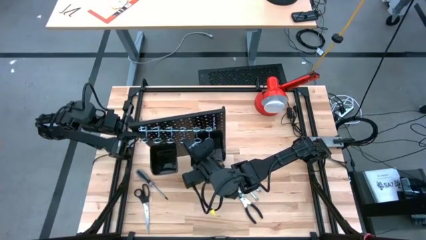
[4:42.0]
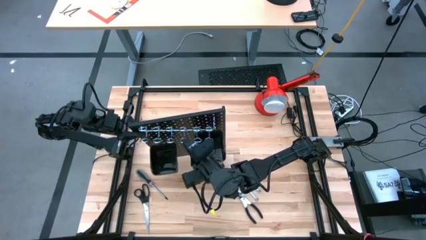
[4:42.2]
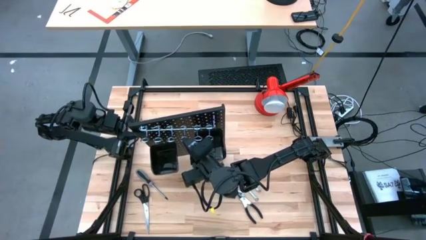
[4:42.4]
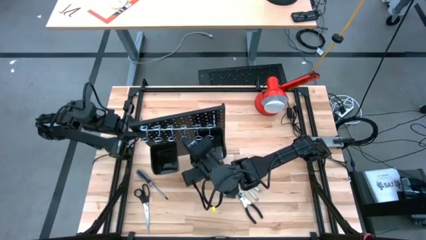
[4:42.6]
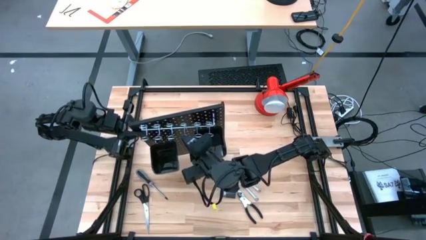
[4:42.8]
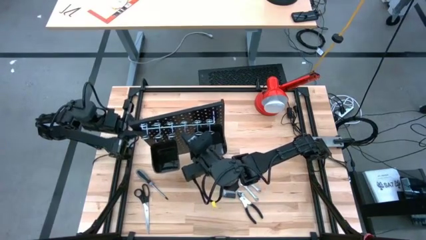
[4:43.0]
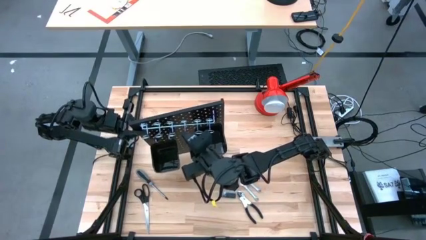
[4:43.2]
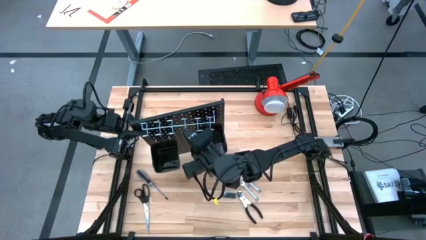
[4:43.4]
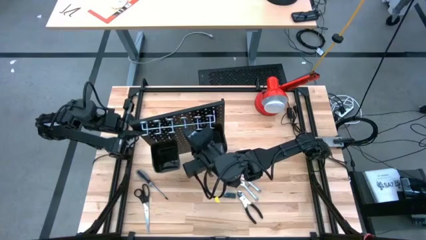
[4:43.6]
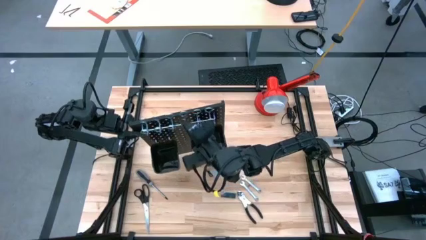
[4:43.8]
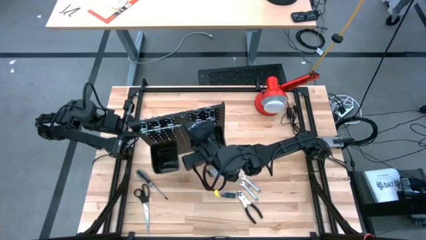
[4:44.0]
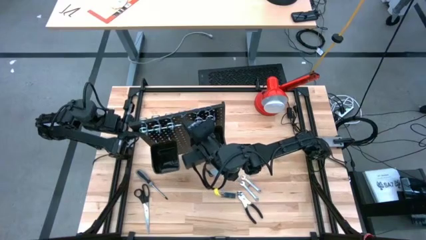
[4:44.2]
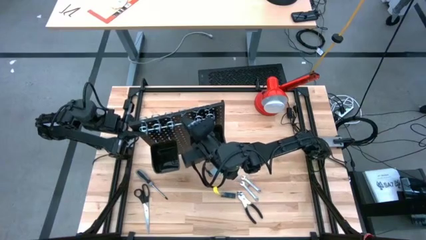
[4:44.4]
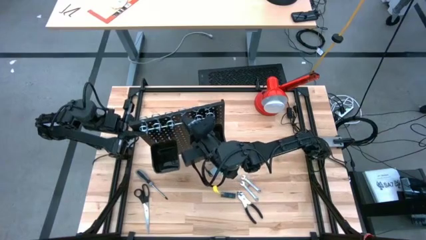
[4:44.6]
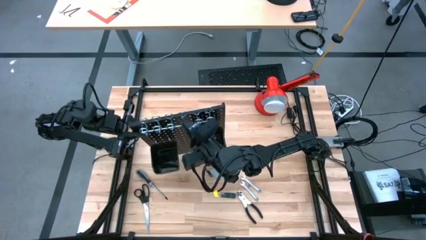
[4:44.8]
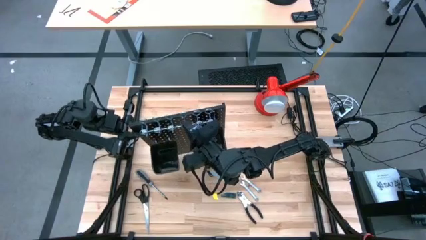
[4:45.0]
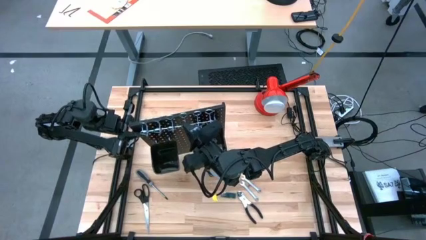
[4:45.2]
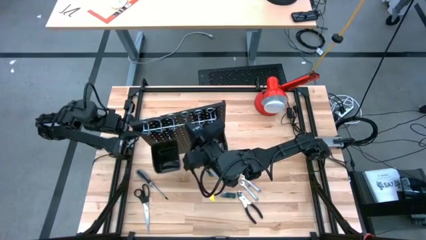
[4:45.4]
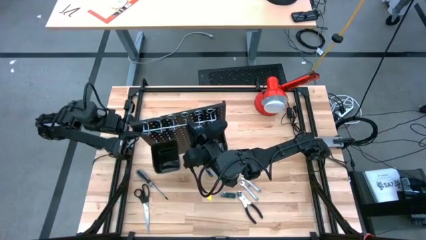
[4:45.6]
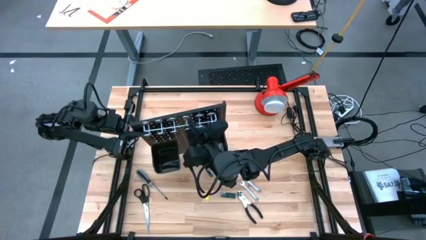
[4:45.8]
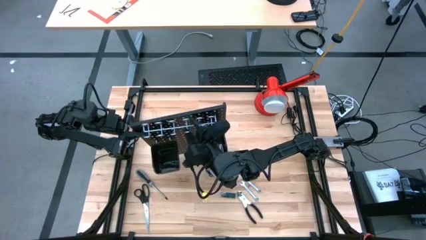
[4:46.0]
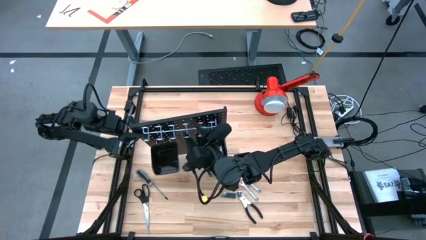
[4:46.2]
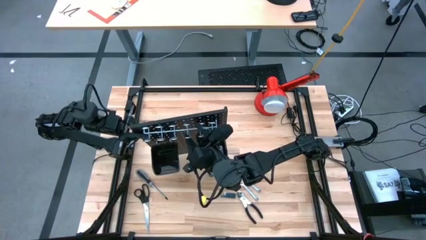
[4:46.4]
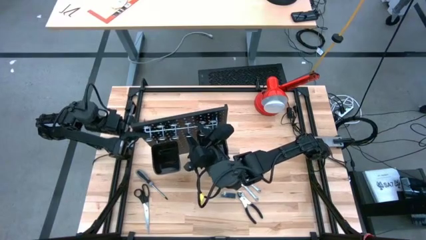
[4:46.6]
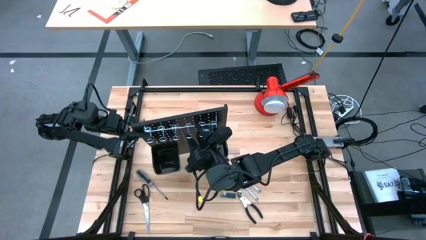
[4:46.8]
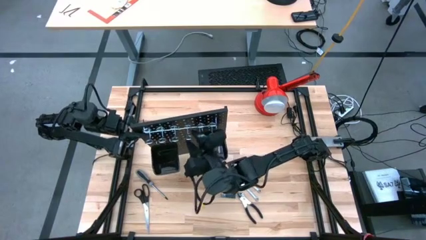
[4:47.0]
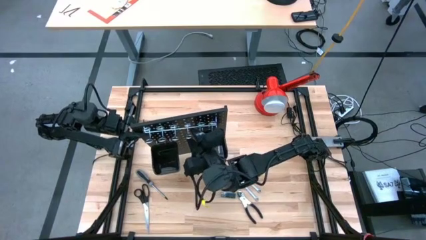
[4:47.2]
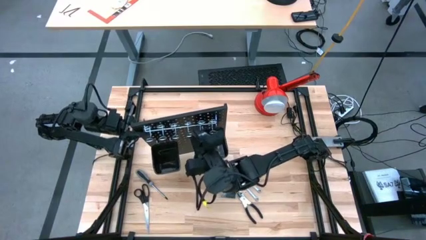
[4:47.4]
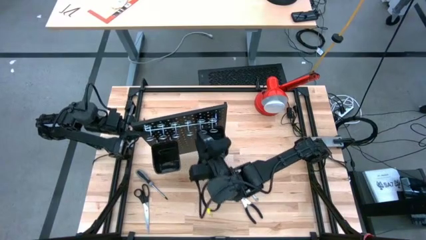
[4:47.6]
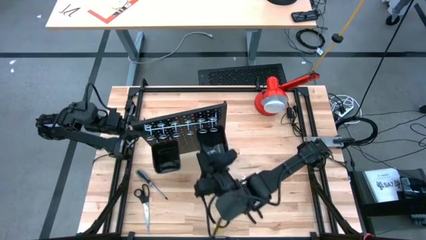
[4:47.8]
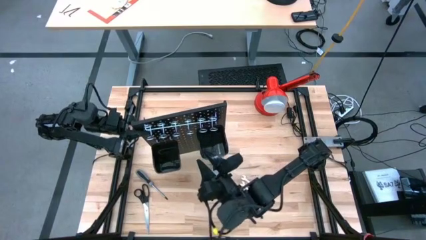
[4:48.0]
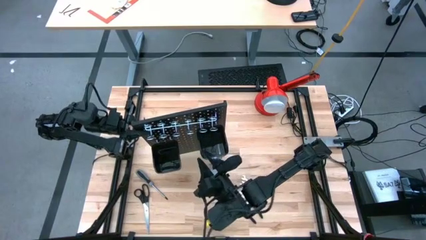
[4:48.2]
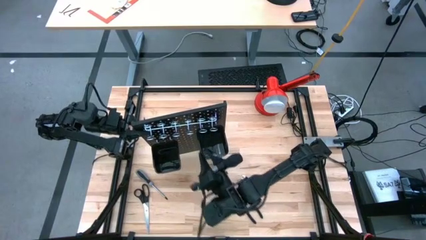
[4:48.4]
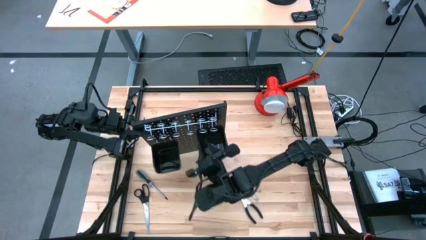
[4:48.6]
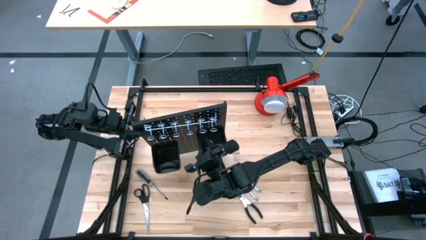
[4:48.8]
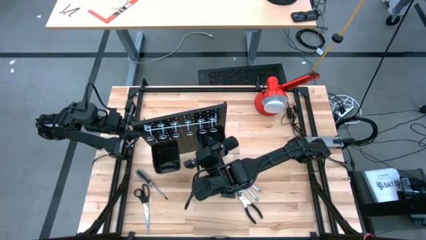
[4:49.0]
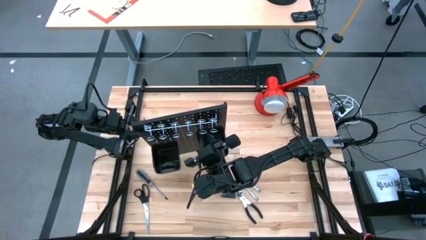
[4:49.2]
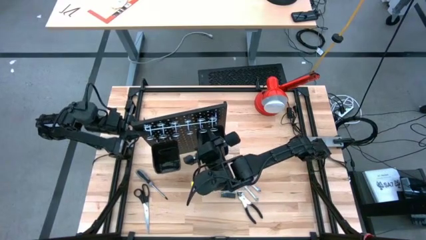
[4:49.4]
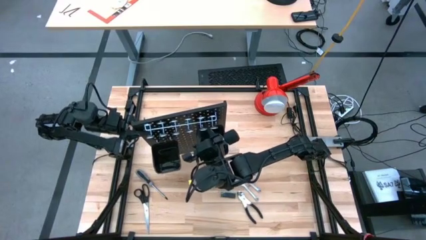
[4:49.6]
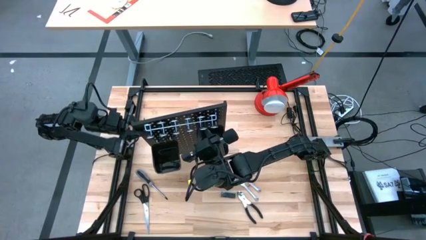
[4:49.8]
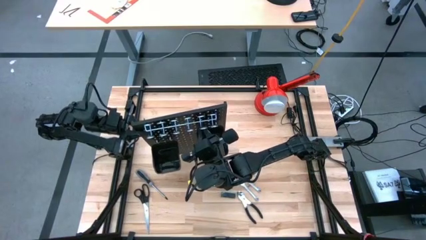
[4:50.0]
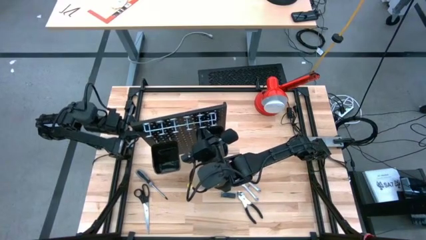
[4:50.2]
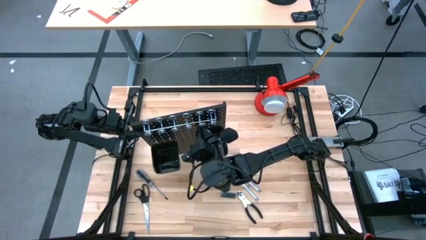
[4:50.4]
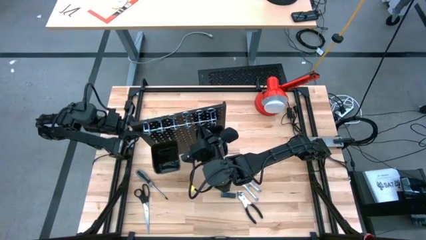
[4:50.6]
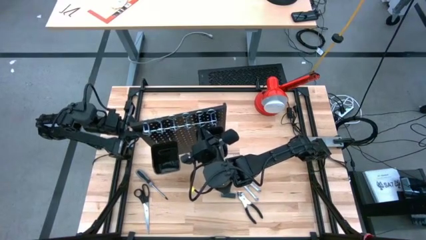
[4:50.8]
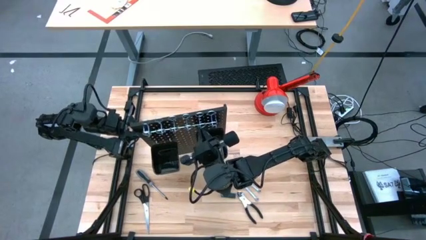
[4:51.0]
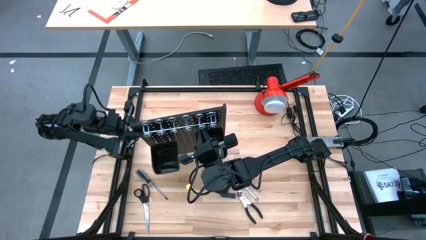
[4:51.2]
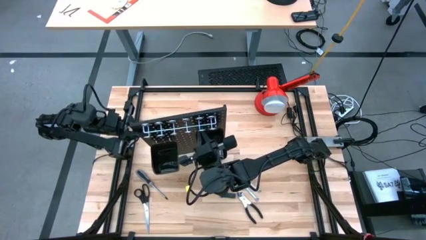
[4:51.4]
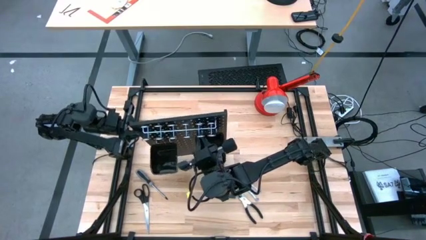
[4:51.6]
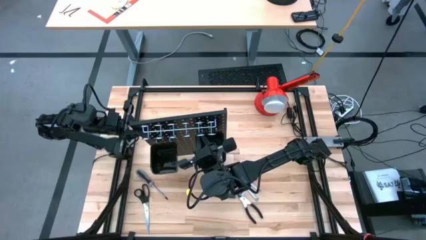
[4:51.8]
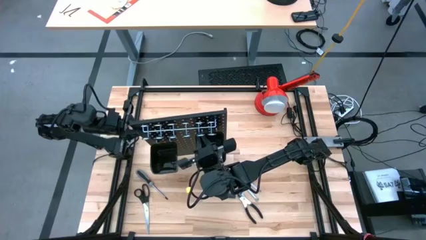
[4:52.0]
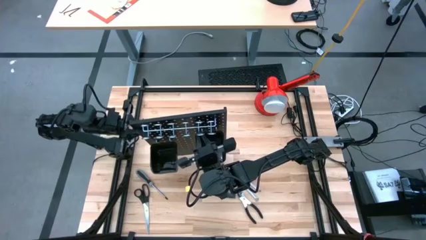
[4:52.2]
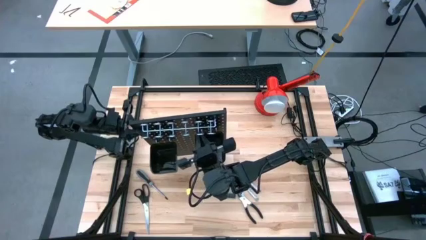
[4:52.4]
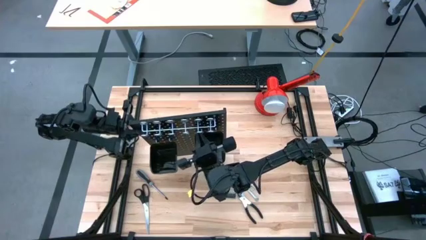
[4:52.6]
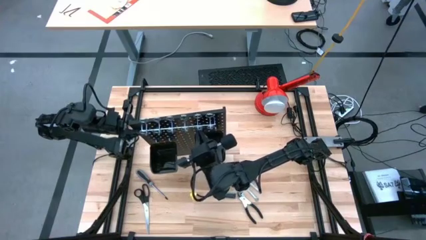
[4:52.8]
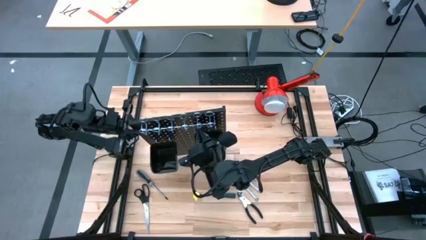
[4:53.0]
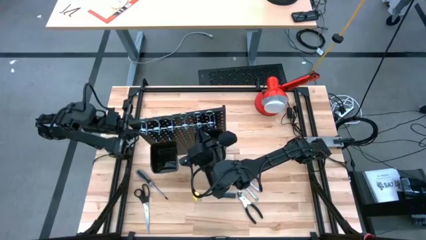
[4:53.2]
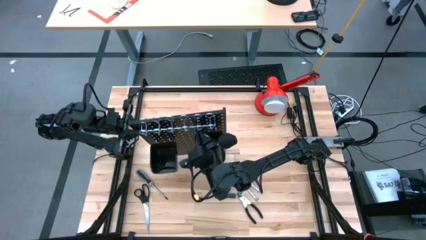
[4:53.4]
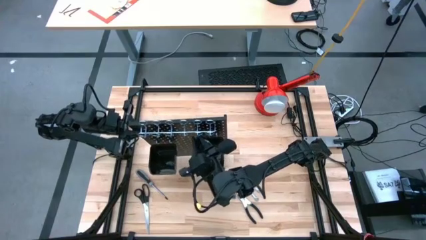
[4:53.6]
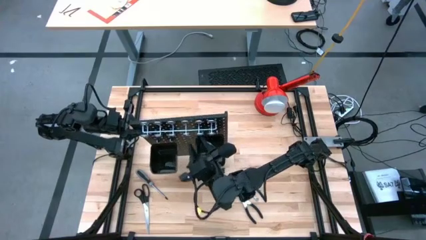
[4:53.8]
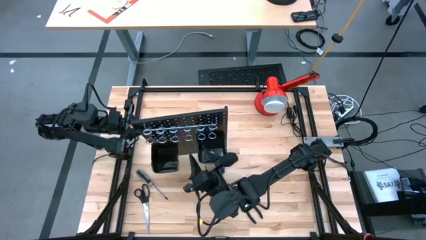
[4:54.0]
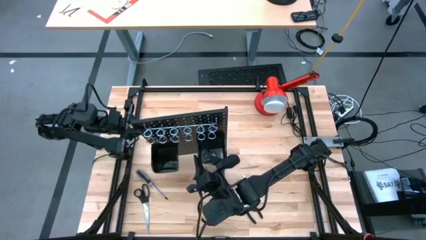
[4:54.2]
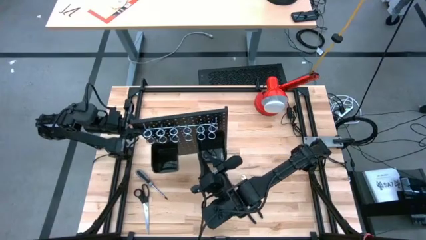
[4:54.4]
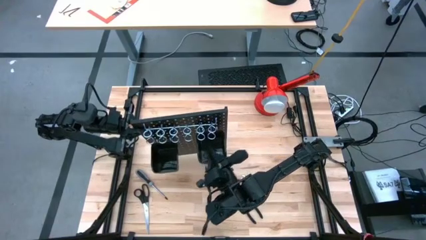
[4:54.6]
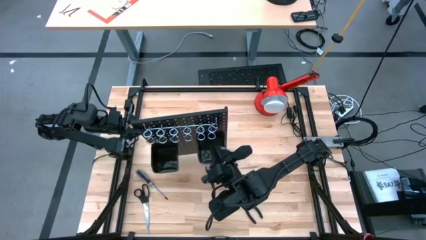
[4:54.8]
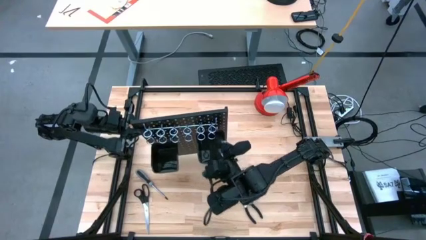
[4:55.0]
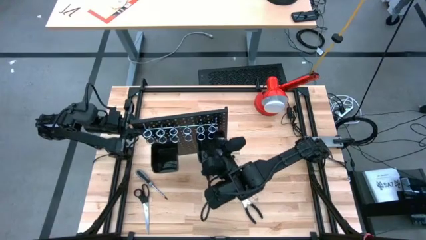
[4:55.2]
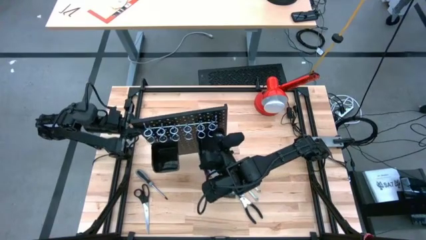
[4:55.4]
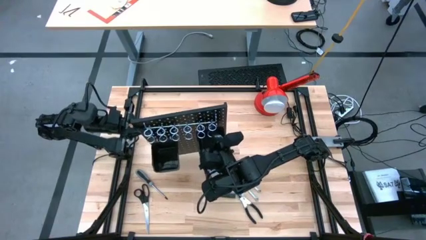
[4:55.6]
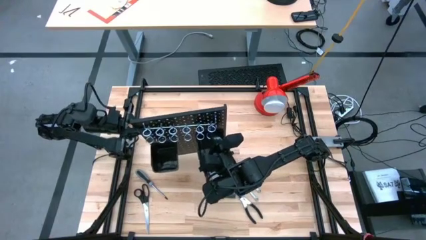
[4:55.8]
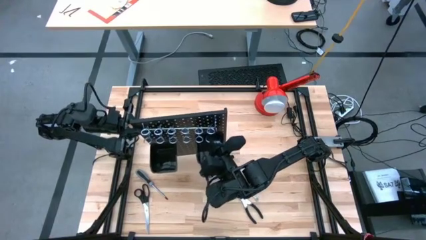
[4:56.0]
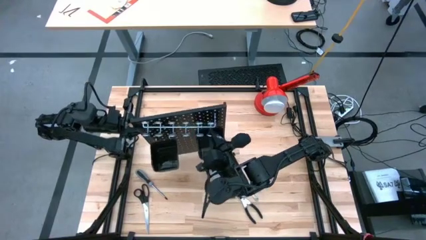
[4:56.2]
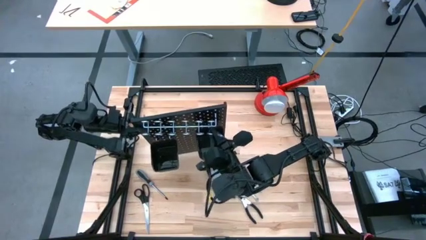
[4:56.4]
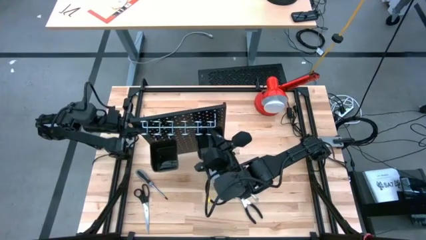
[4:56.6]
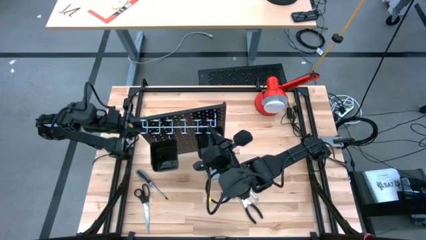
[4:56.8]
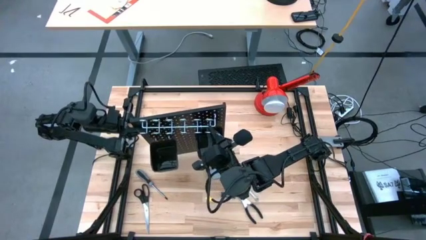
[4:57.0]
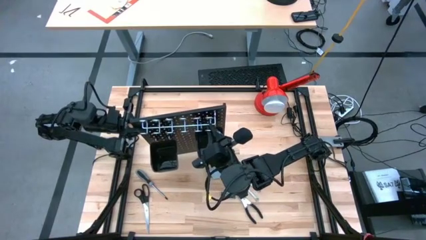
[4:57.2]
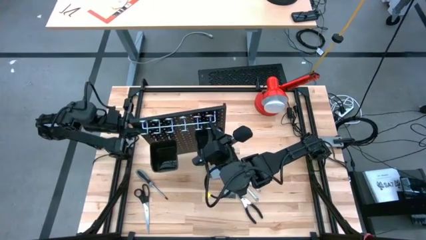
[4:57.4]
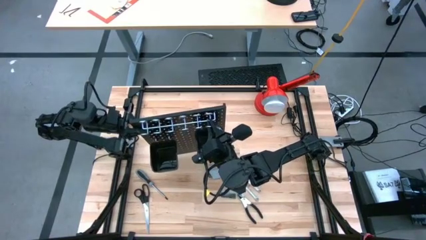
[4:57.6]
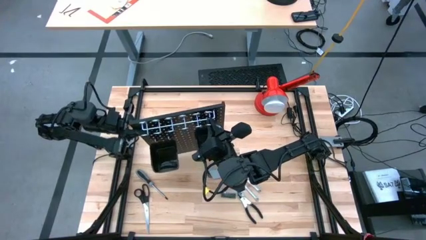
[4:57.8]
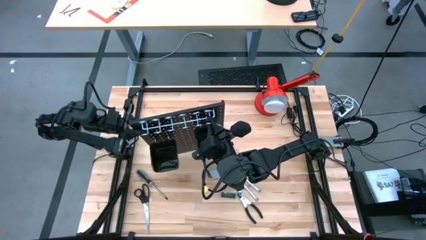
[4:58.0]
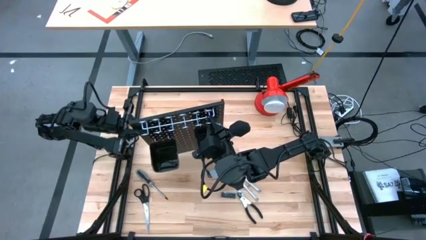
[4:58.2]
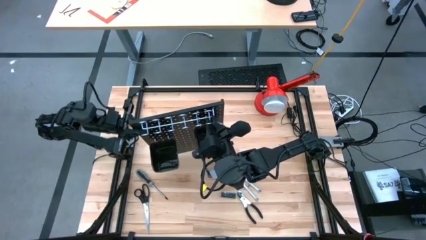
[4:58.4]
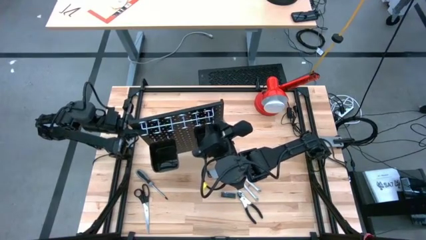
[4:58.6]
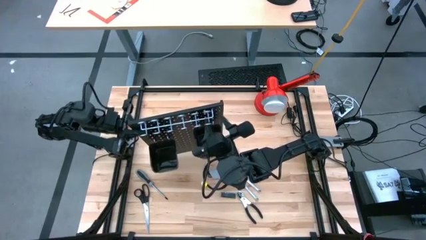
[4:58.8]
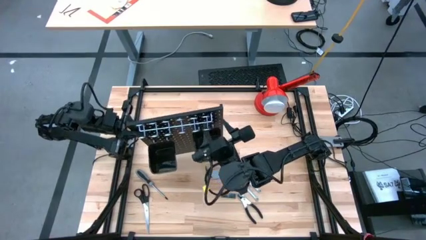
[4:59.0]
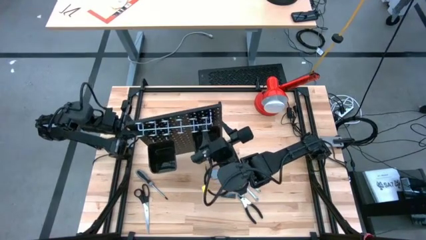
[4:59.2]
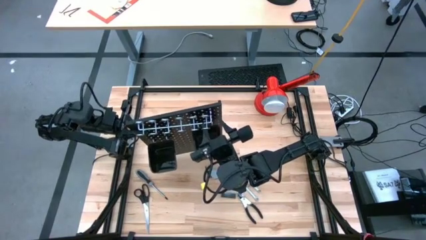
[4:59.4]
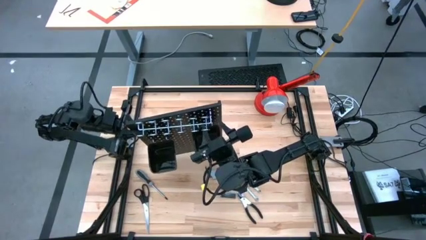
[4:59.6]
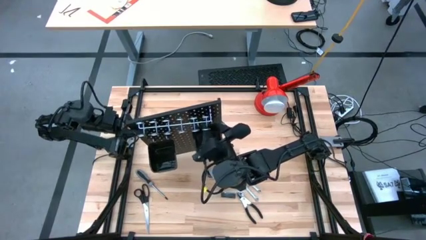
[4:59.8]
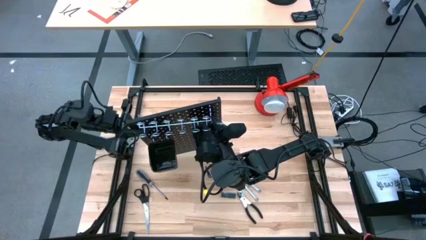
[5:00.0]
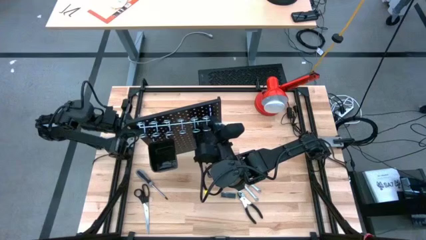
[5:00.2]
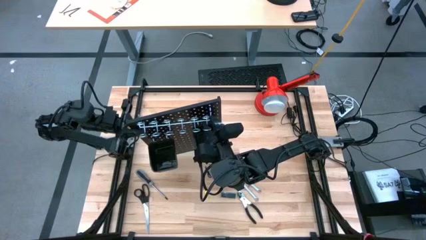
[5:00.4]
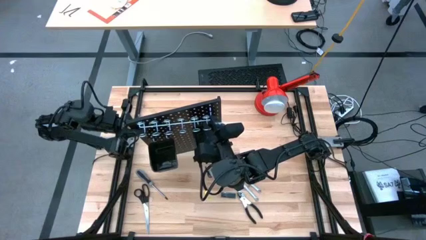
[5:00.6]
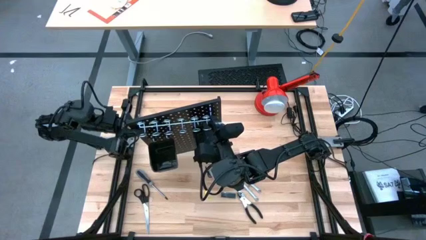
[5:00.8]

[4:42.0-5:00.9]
Task: Hang tools onto peg board
Assemble the tool holder on the pegboard
